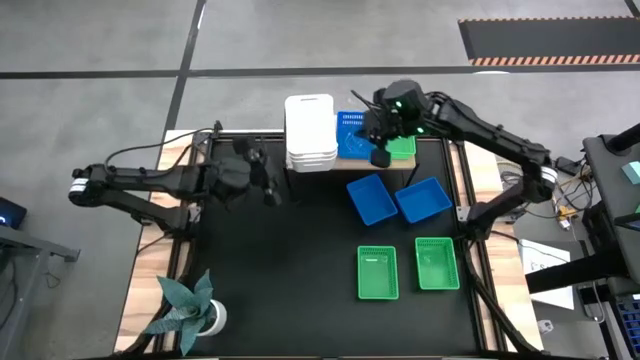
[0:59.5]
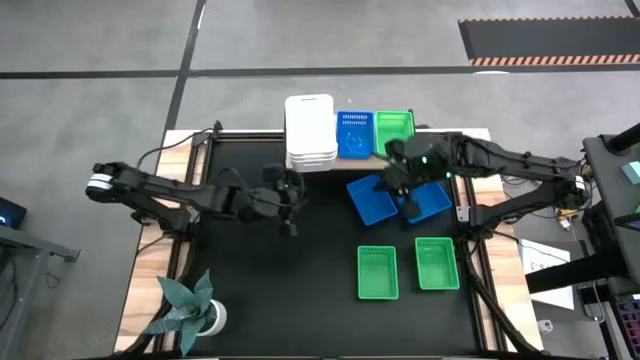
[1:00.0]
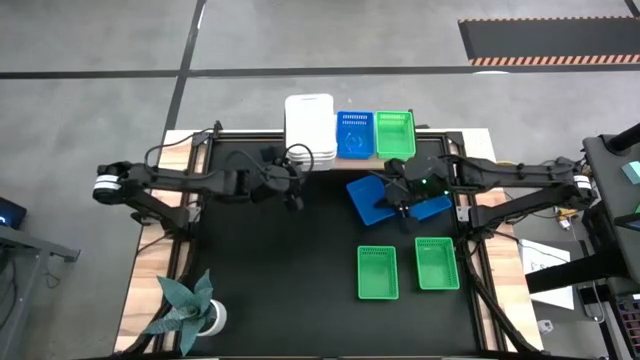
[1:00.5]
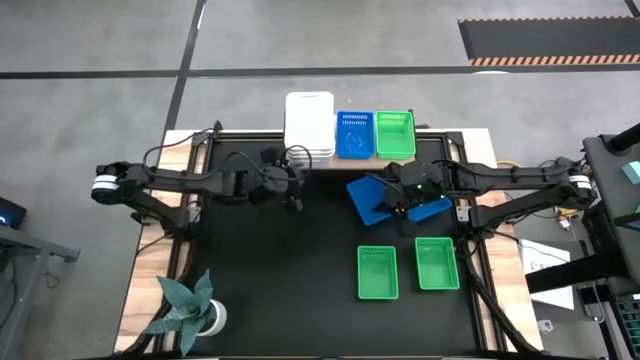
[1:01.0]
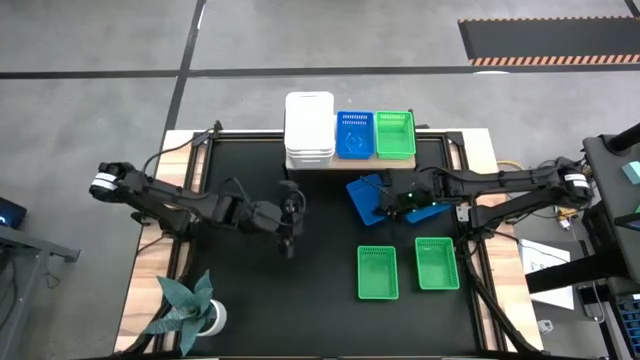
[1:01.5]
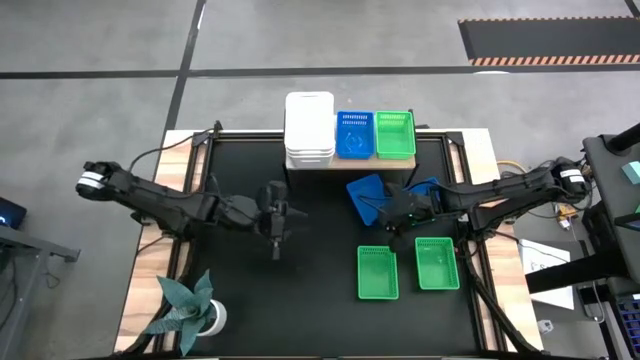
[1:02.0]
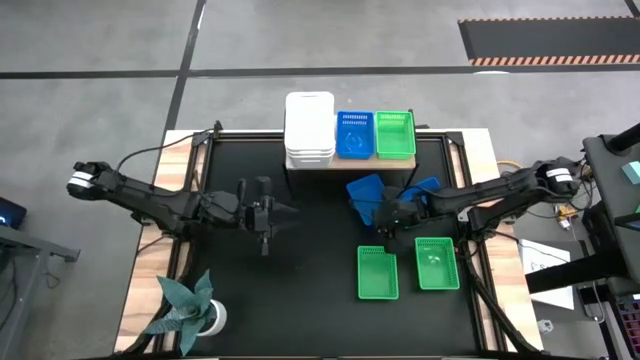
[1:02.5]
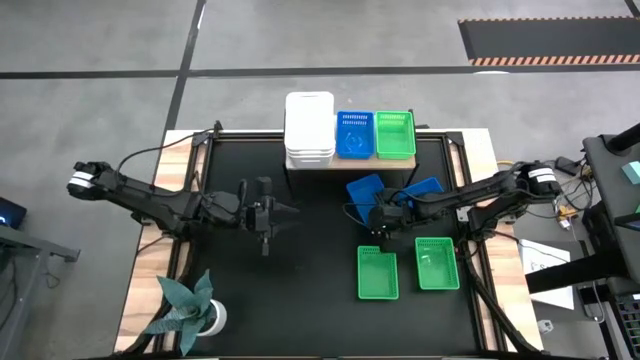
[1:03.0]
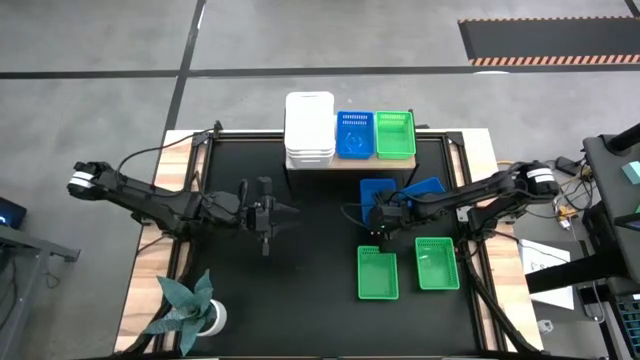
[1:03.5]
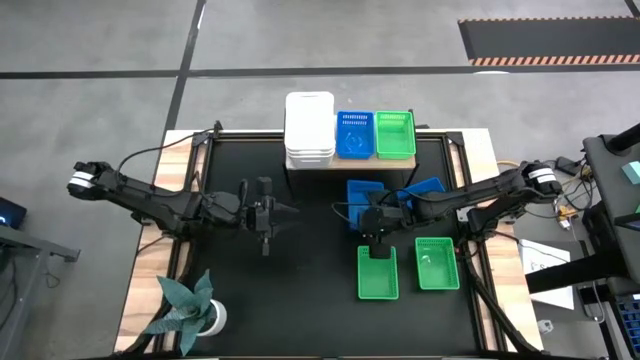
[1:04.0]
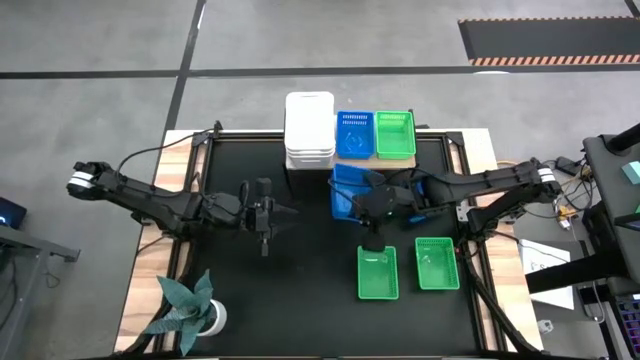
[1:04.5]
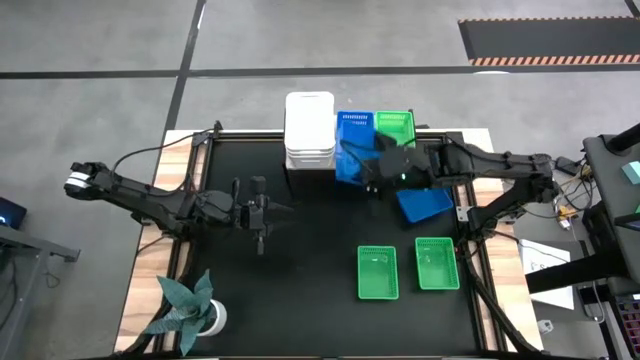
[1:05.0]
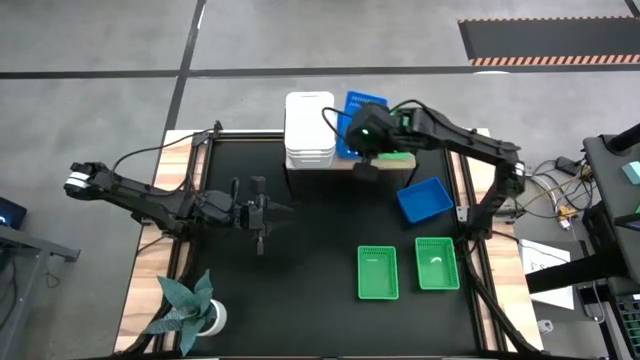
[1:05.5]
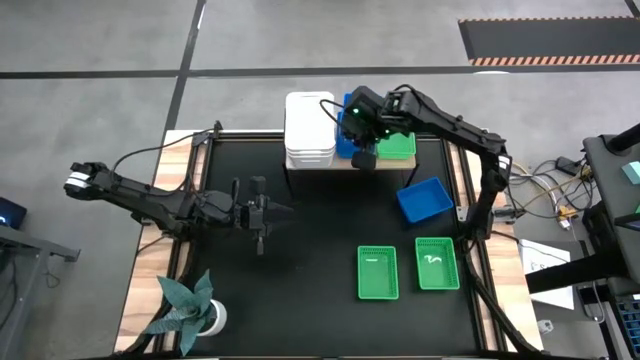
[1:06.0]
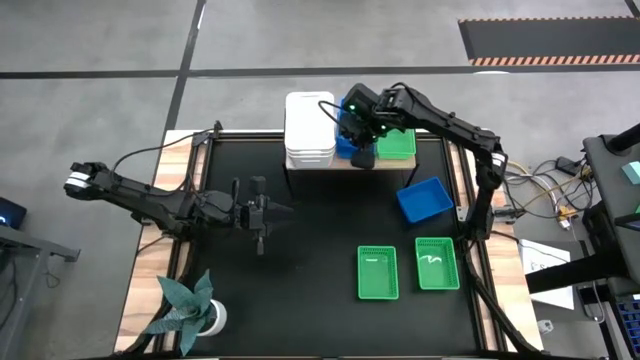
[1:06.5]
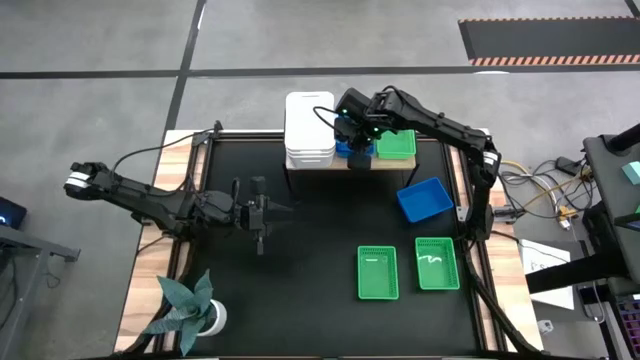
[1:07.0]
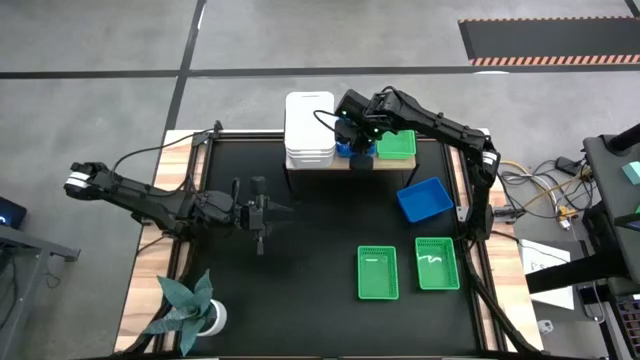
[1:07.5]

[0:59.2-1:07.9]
Task: Stack baskets on shelf by color
Stack the left blue bin on top of the blue bin on the shelf

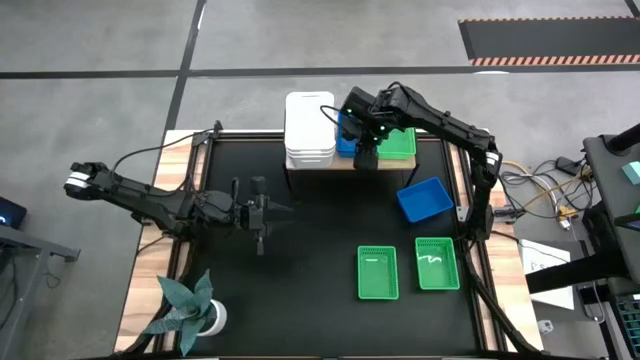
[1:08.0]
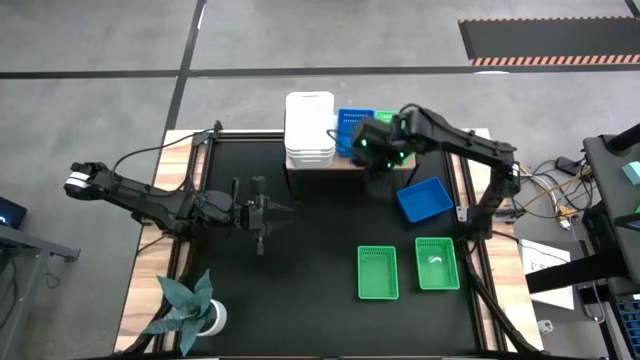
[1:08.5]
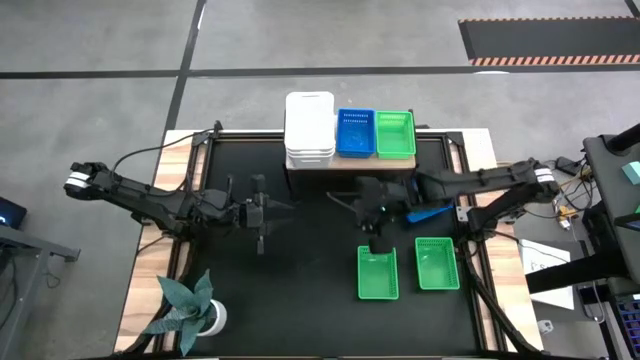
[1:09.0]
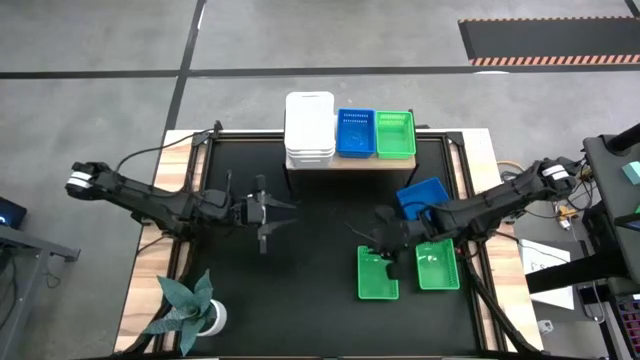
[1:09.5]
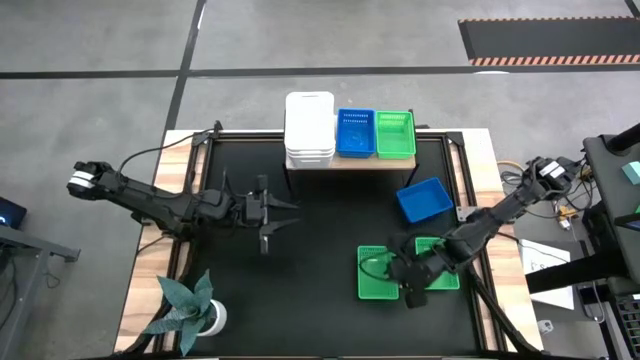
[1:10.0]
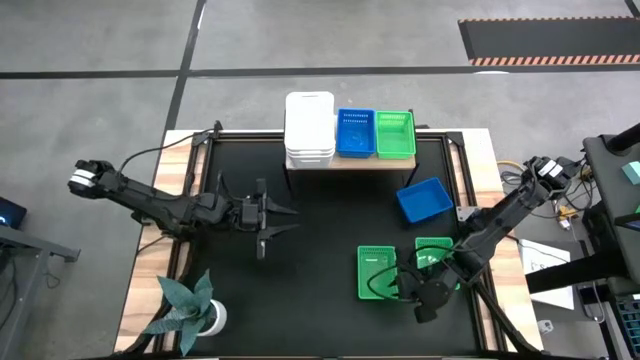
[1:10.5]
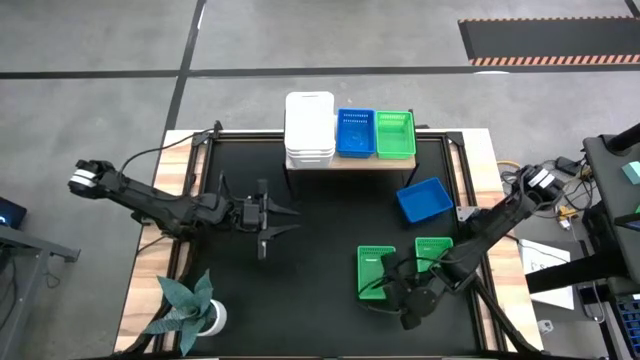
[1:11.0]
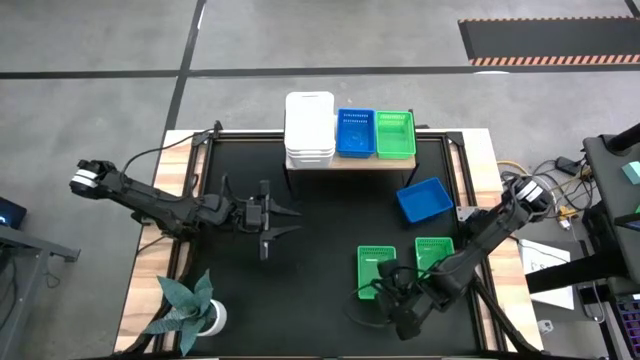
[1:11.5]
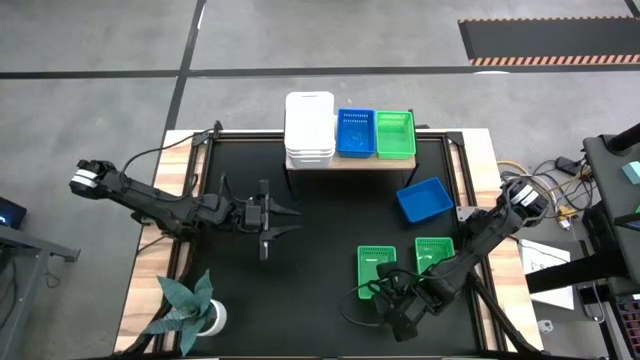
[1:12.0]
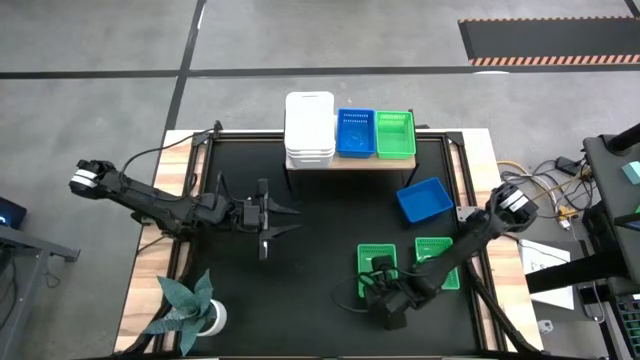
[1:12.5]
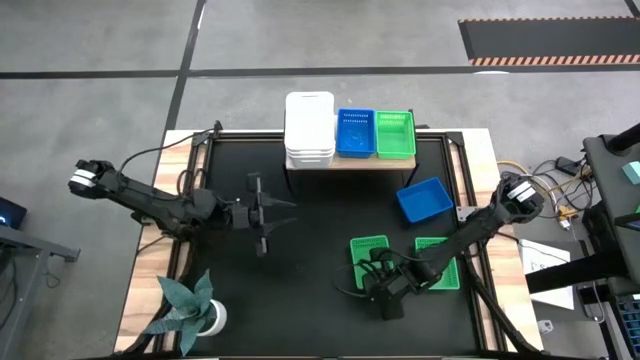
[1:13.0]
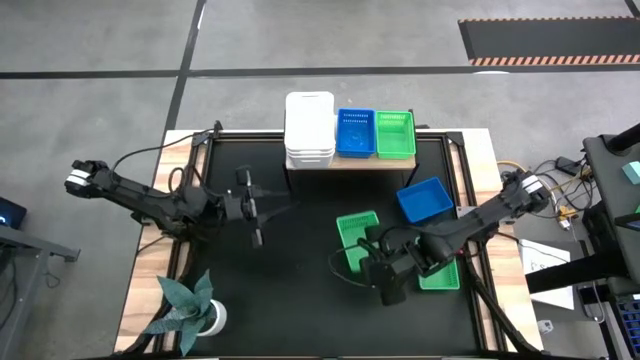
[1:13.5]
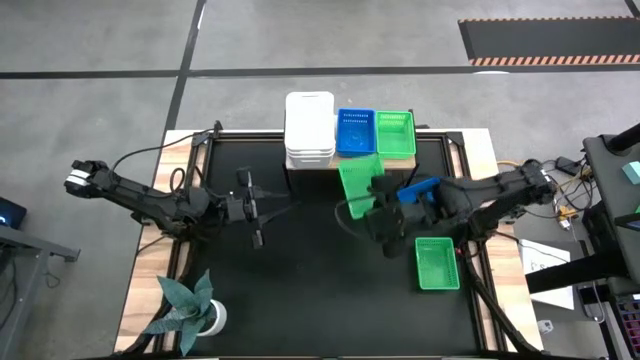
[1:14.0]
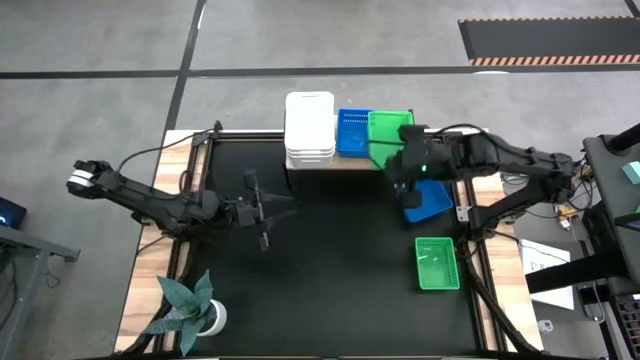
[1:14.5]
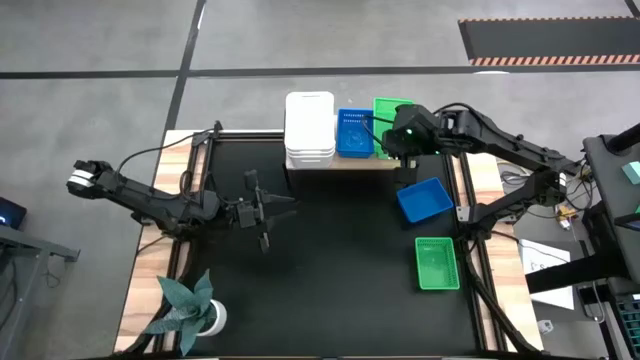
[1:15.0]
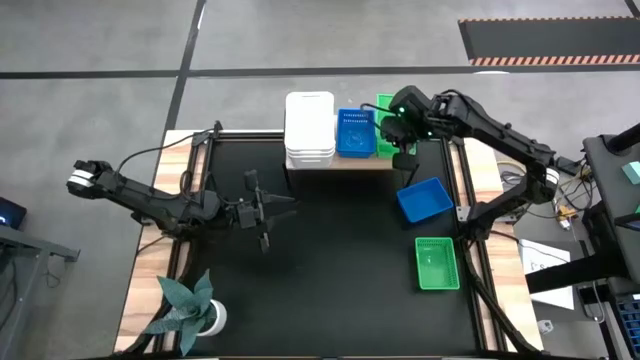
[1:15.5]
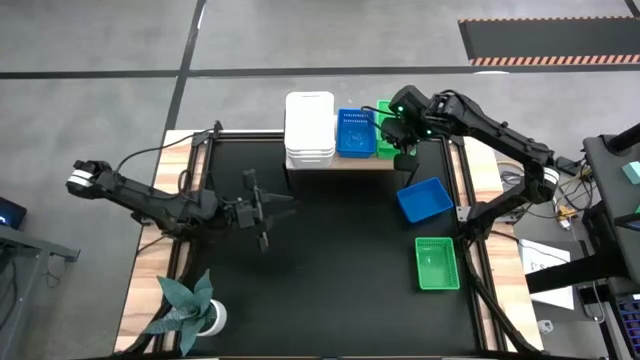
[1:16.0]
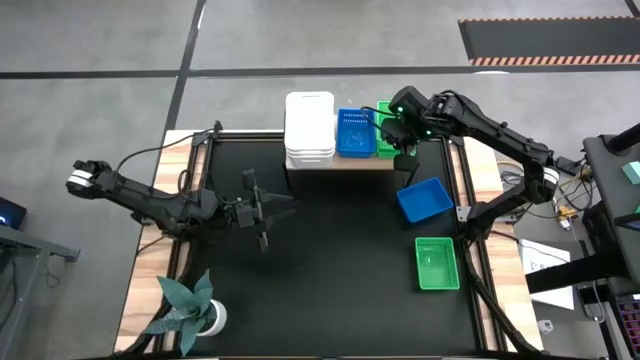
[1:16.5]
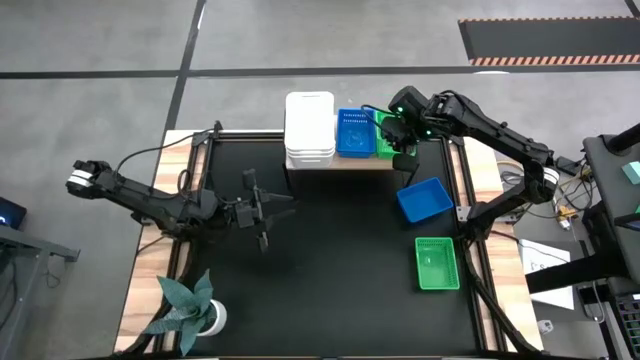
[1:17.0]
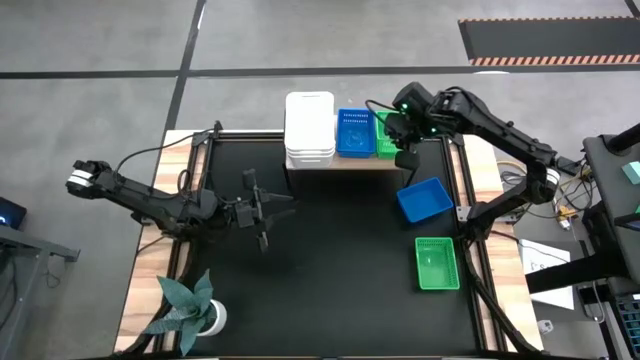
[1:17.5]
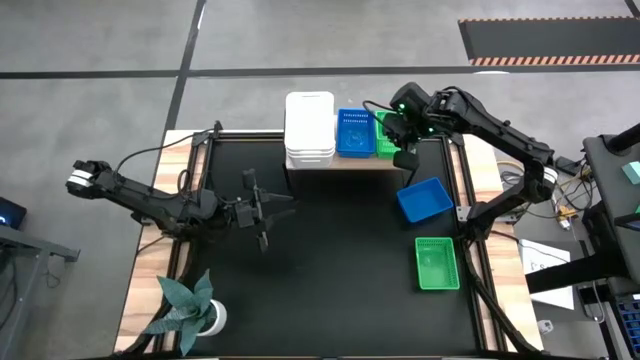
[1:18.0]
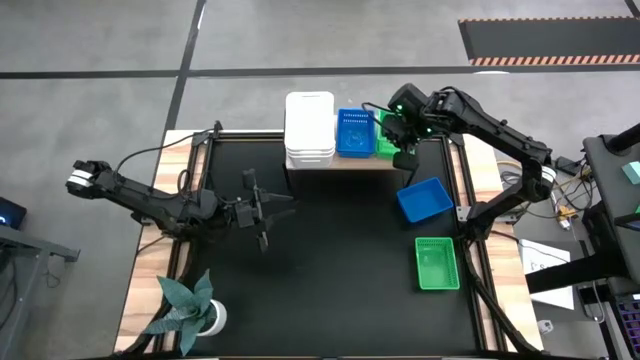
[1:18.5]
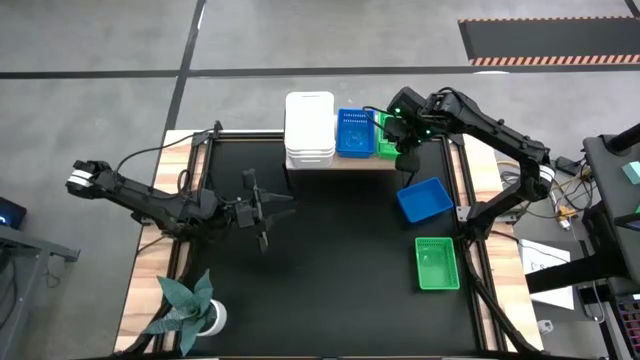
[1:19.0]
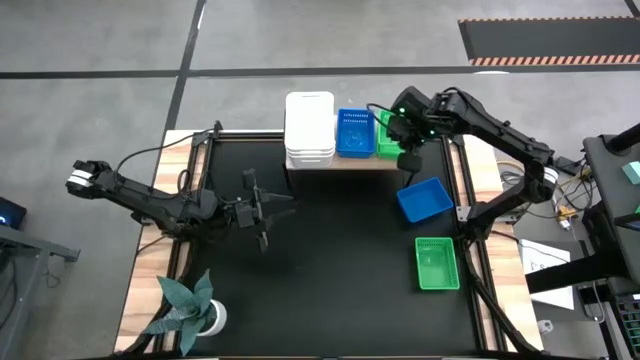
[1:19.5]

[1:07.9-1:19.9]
Stack the left green bin on top of the green bin on the shelf
